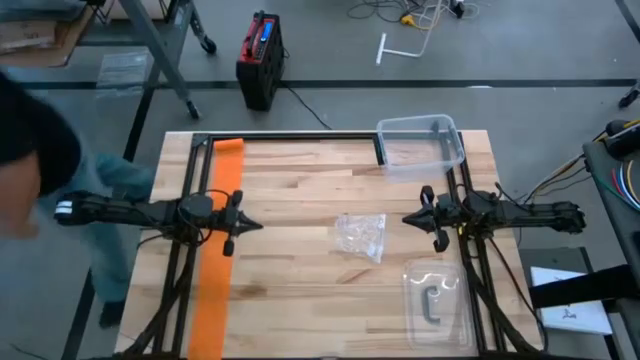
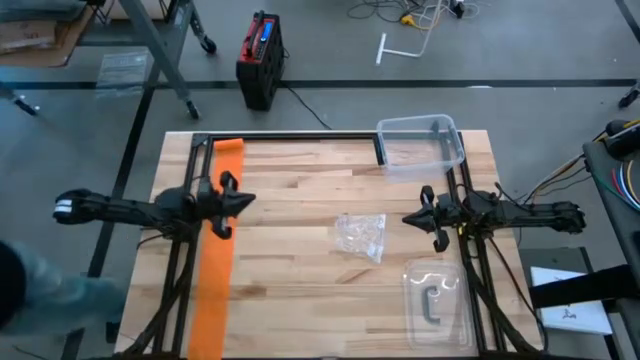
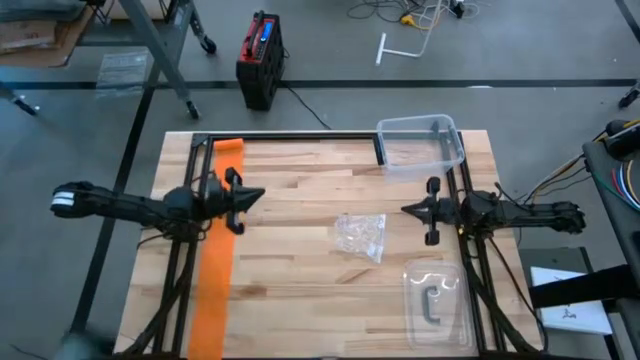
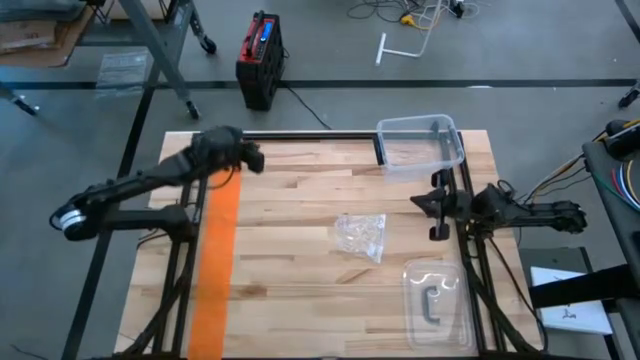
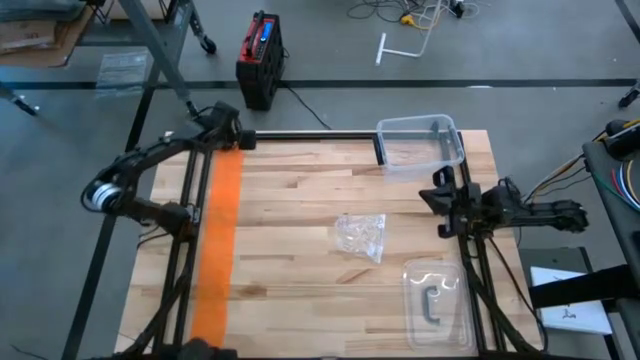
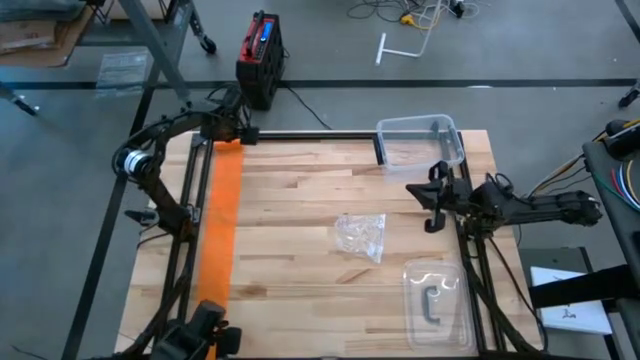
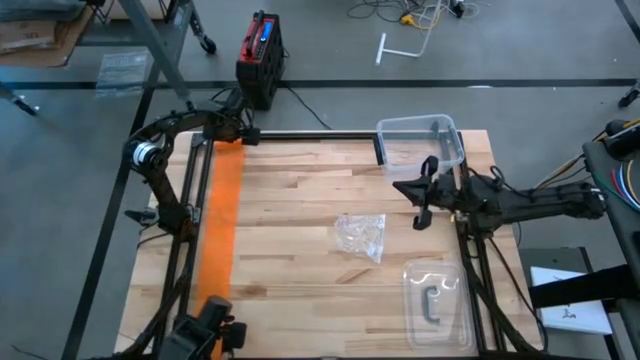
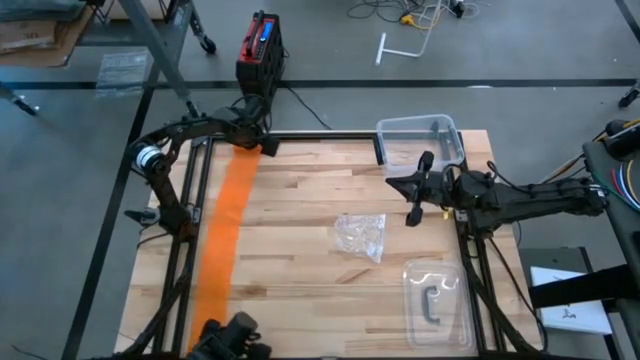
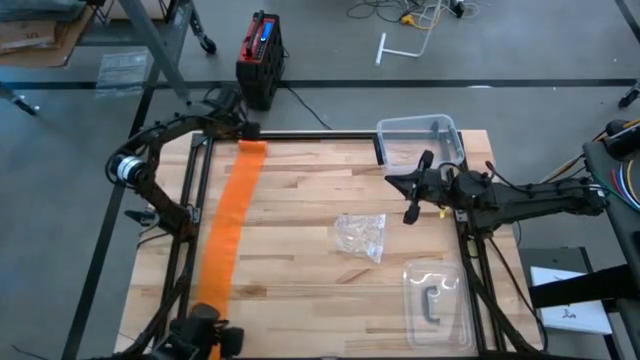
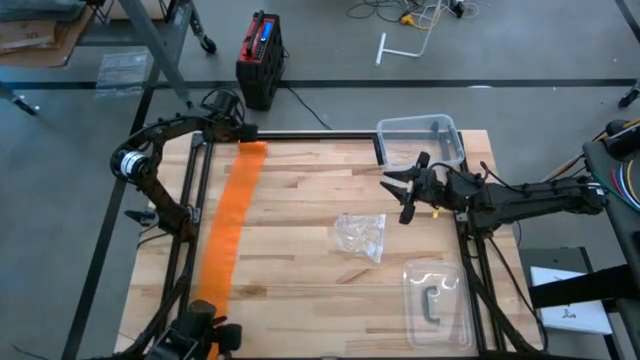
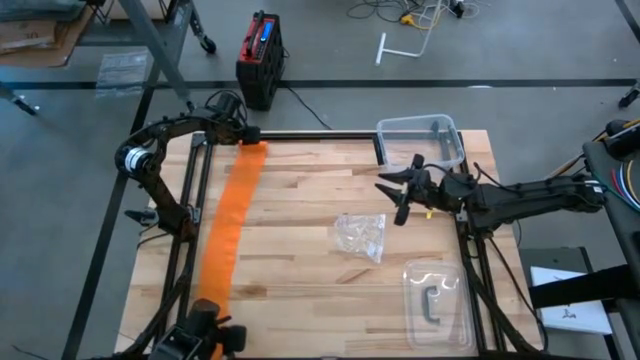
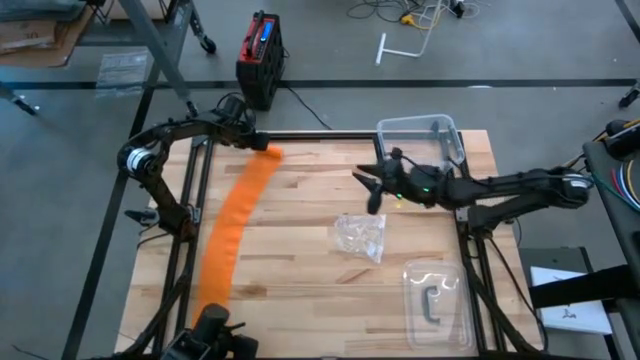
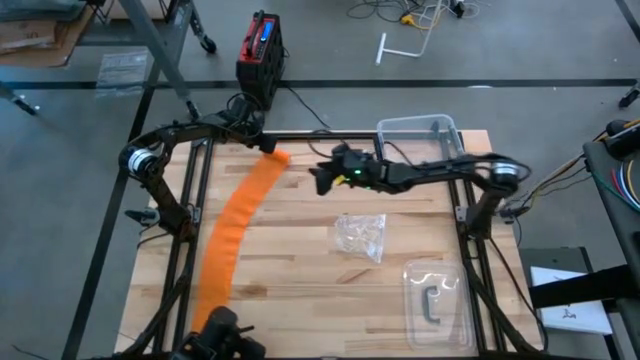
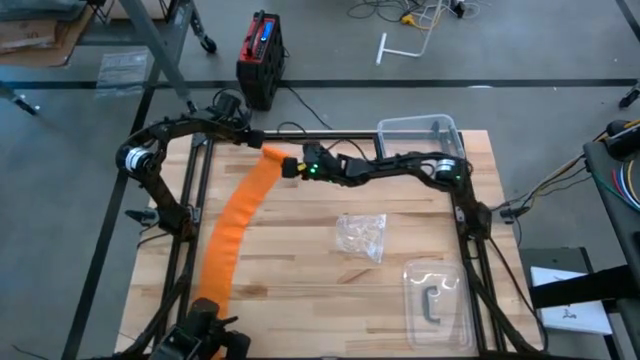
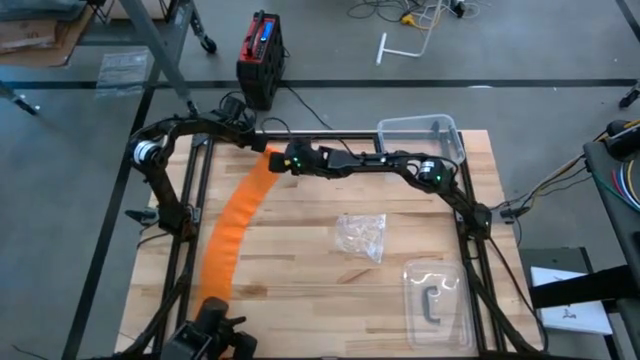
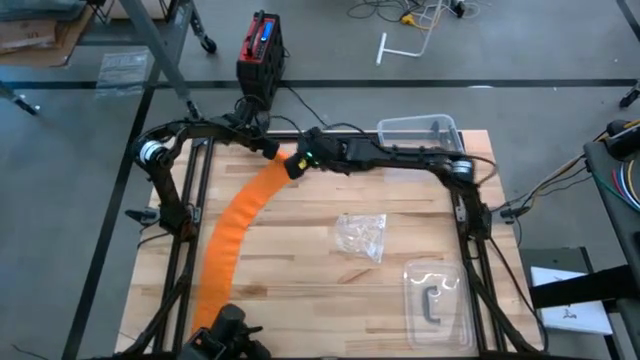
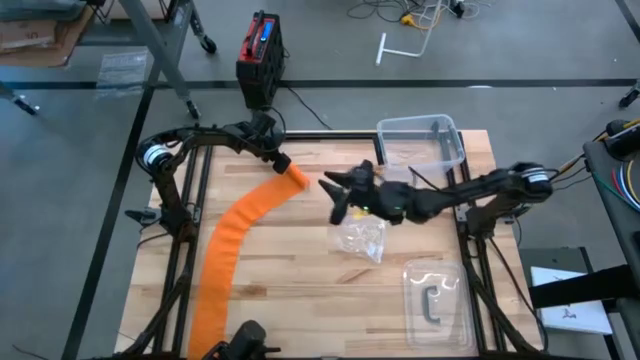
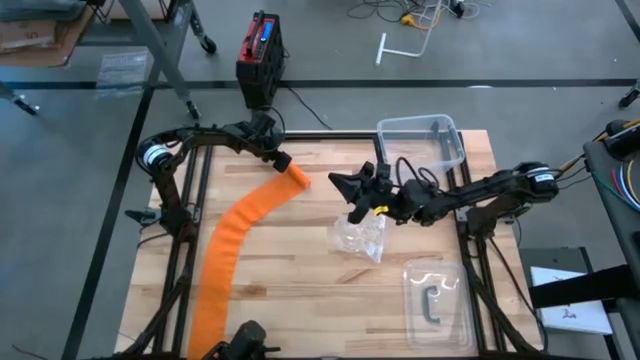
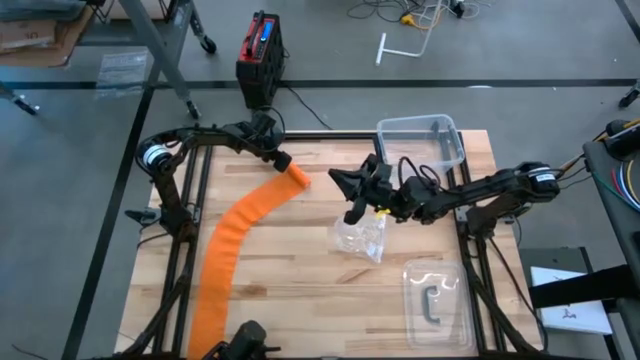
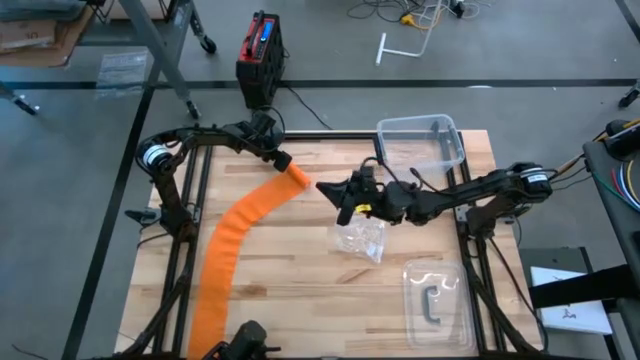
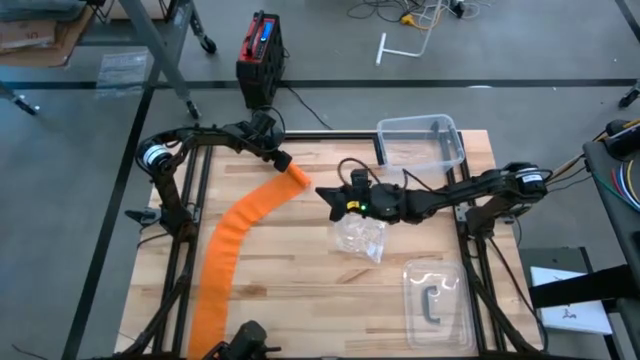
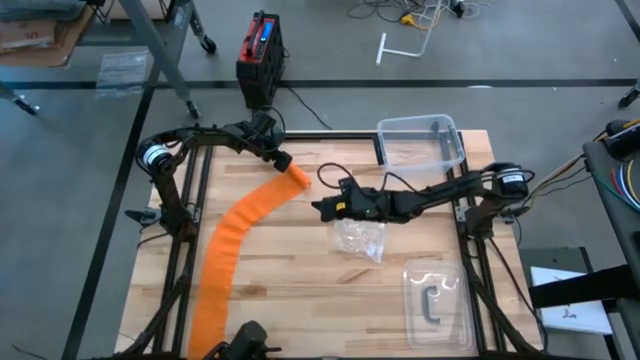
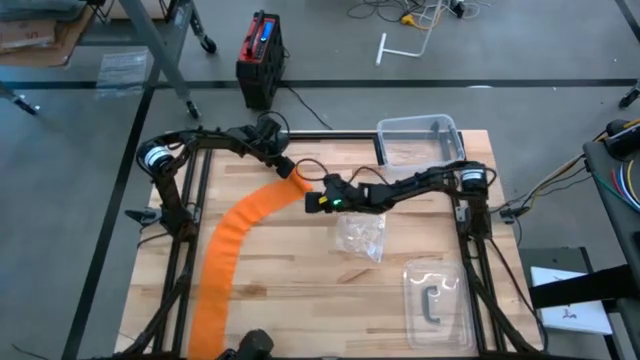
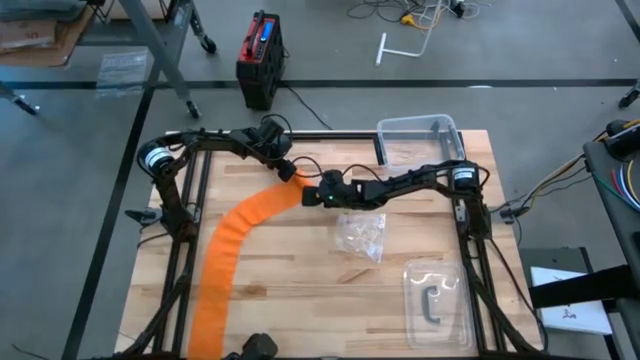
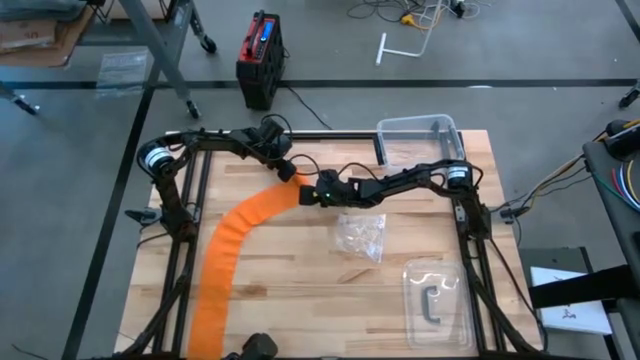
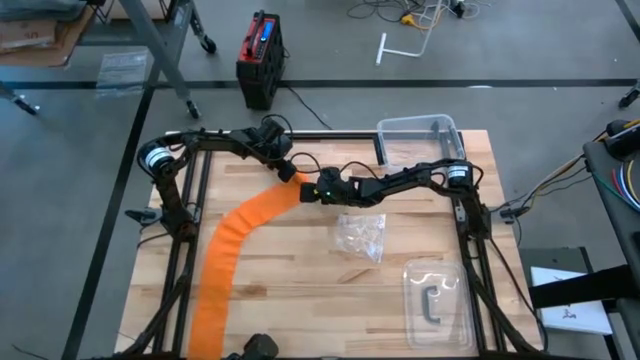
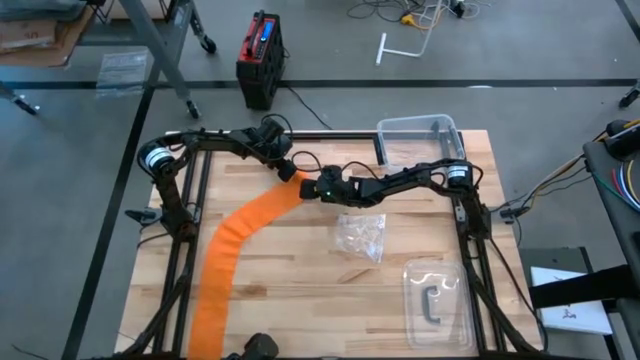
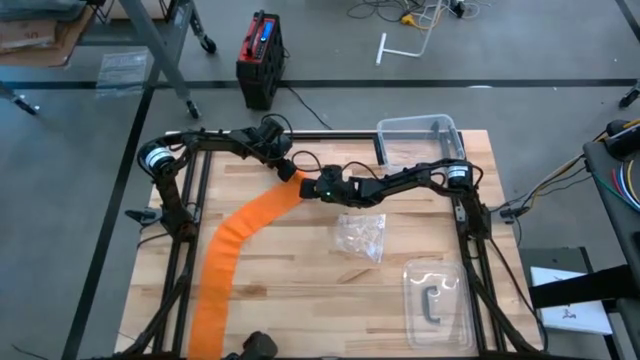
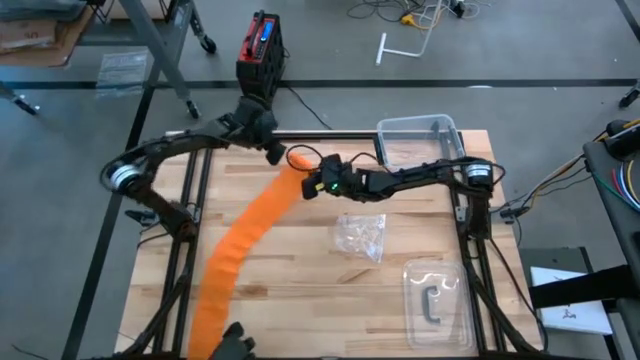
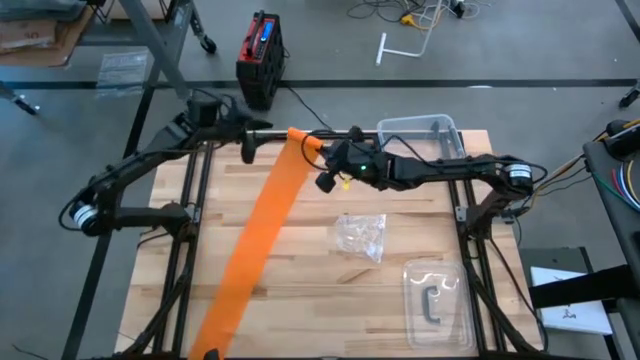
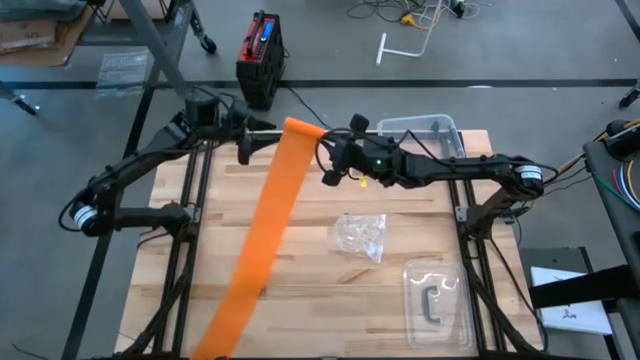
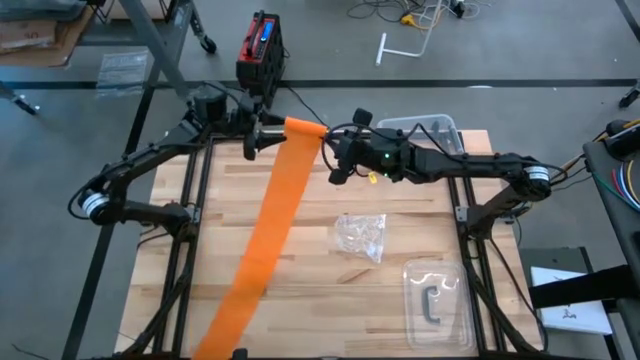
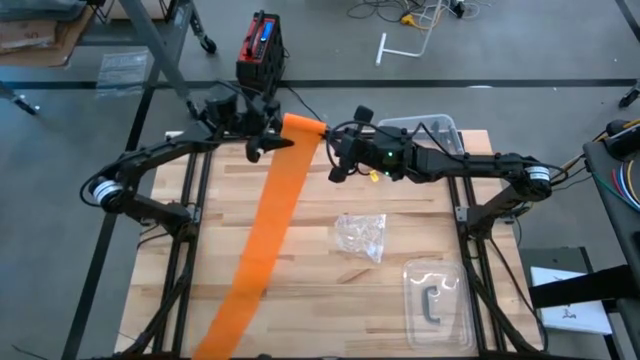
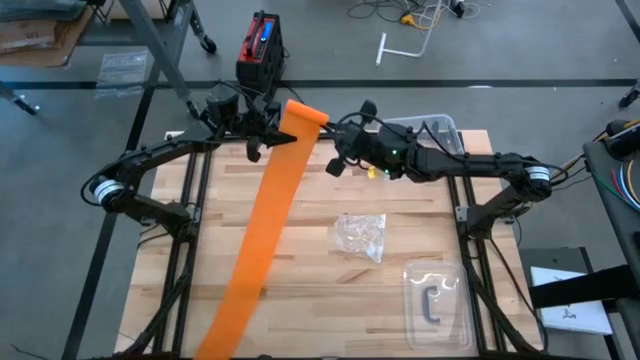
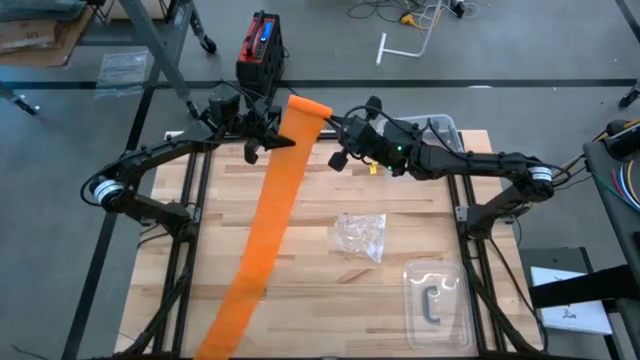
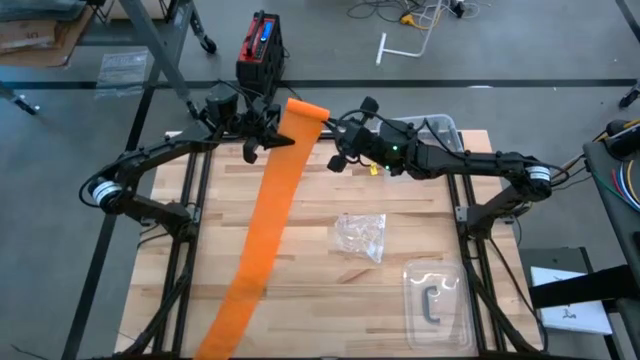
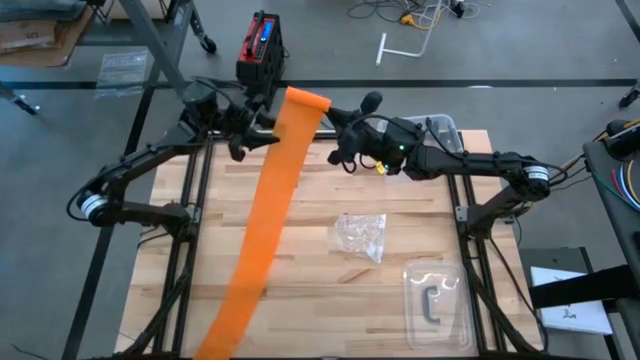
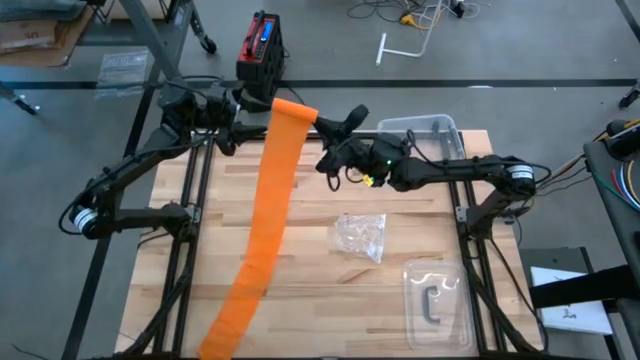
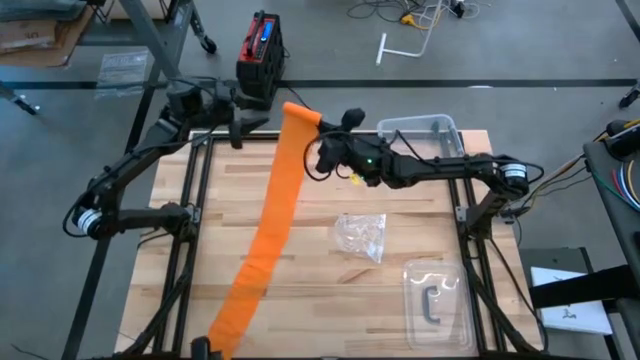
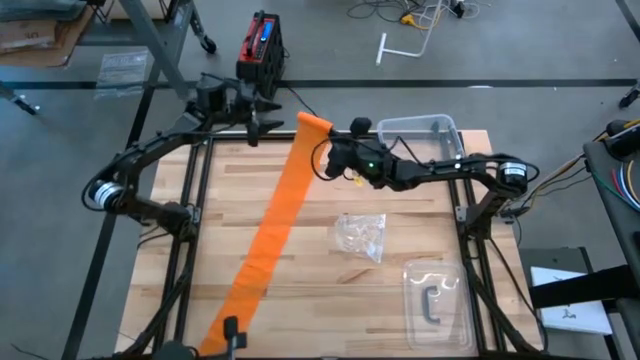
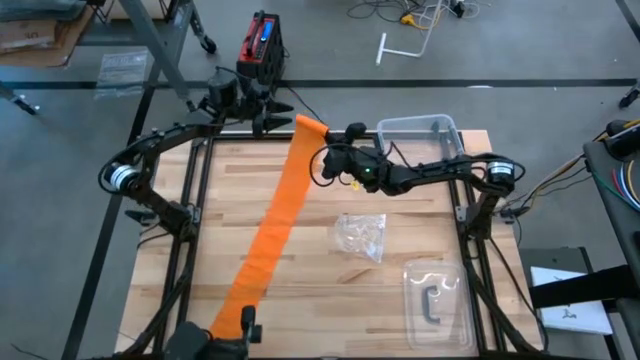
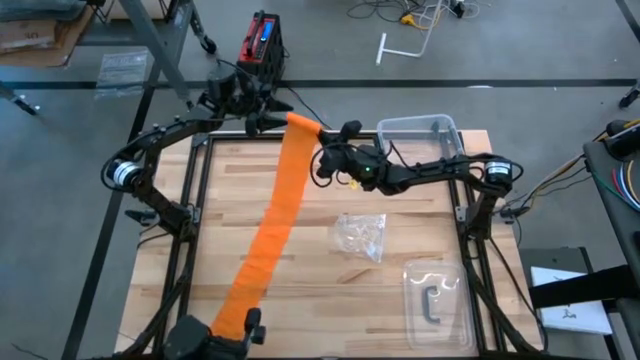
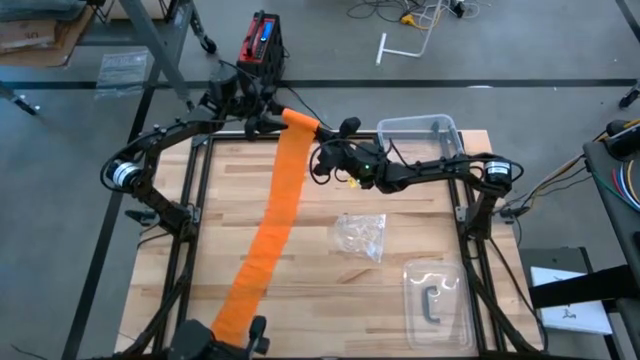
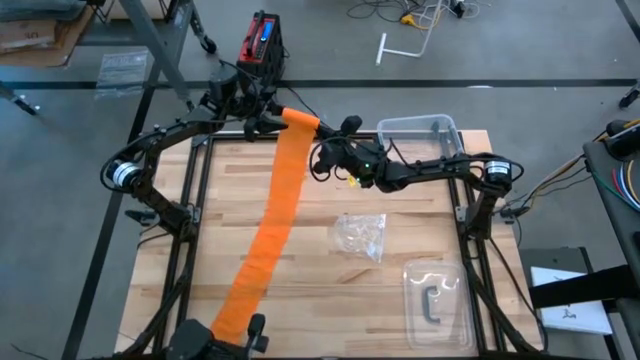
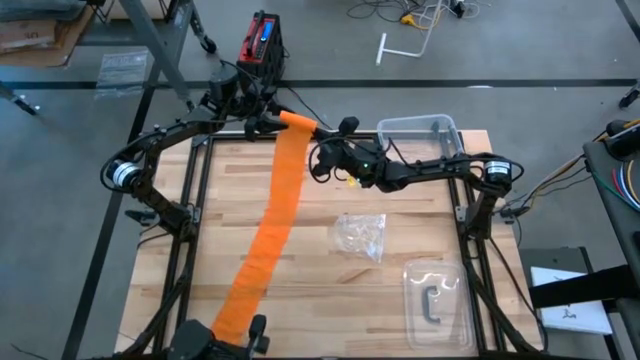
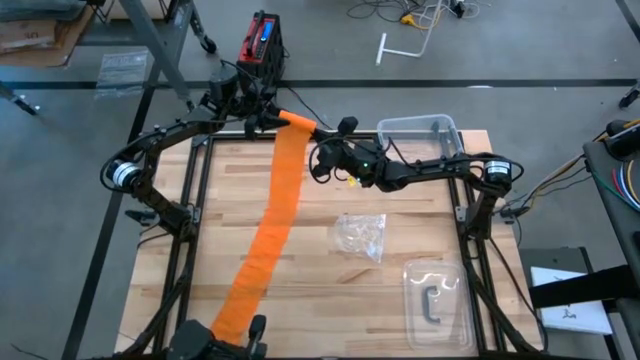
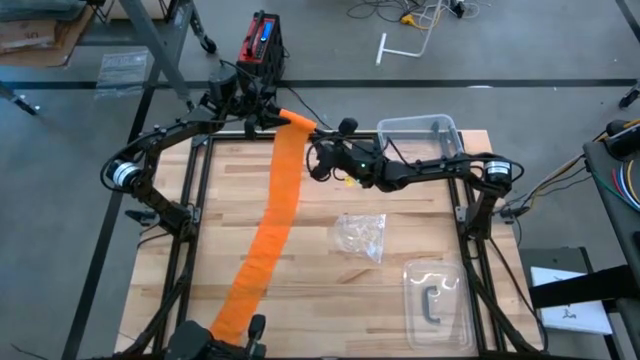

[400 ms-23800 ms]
Task: Roll bandage
Roll the orange bandage
